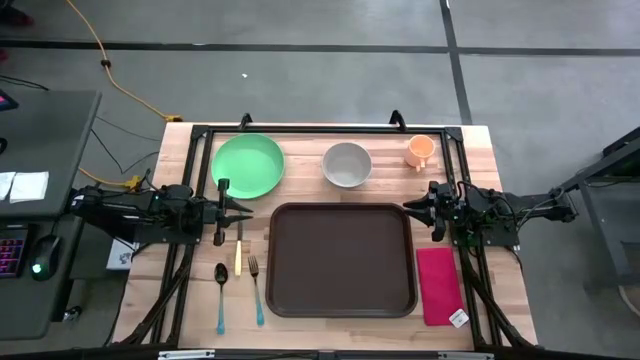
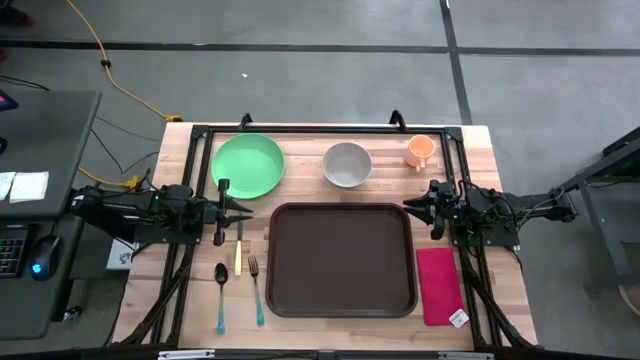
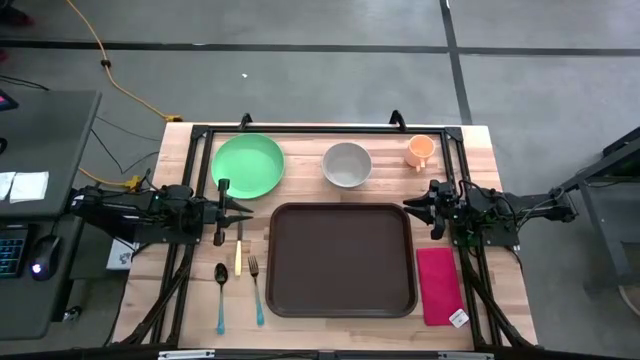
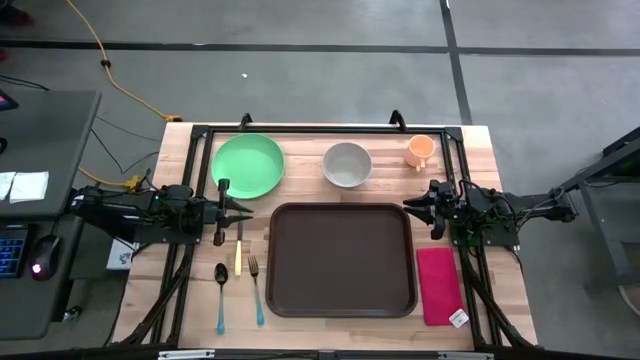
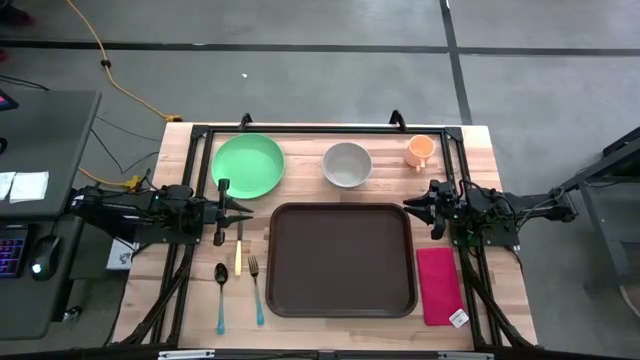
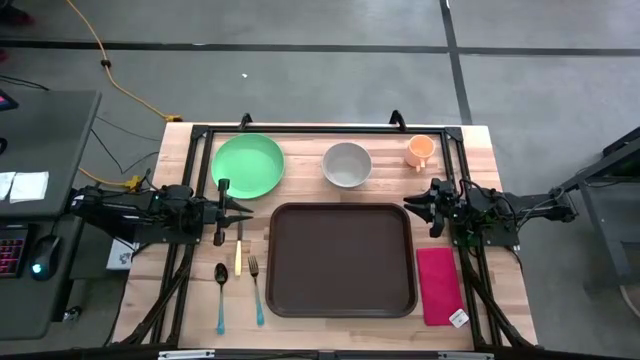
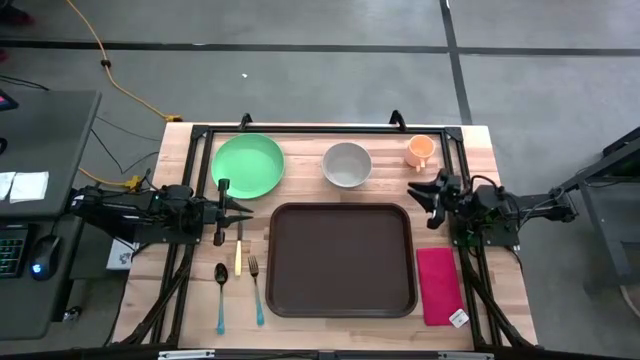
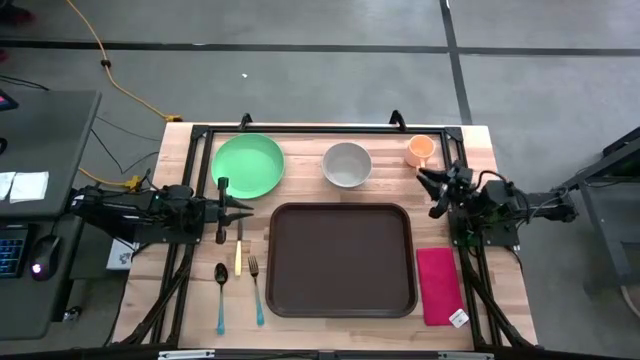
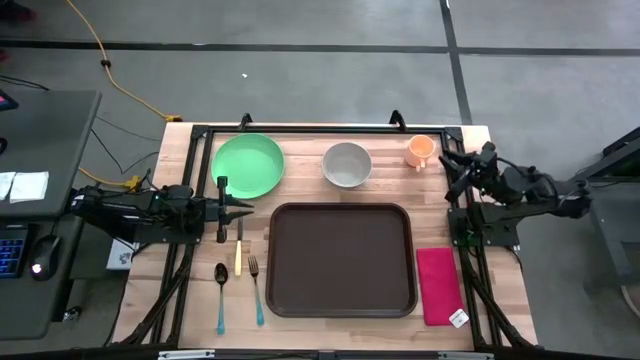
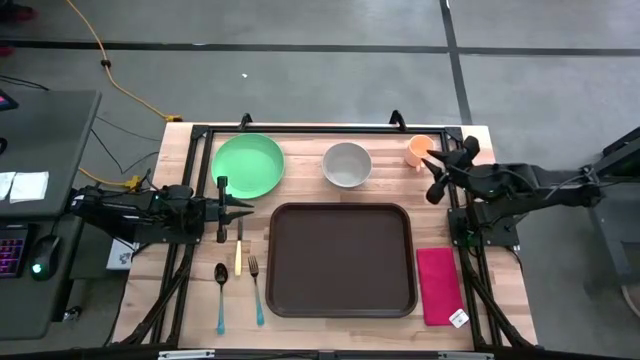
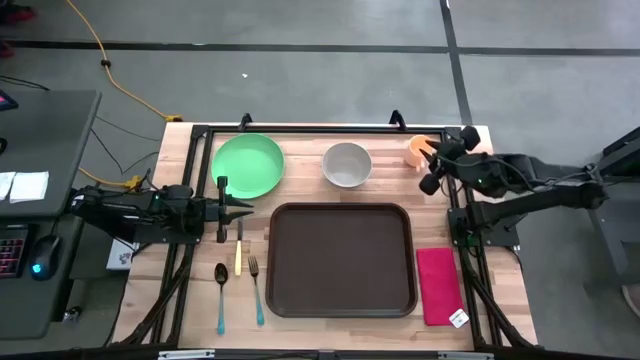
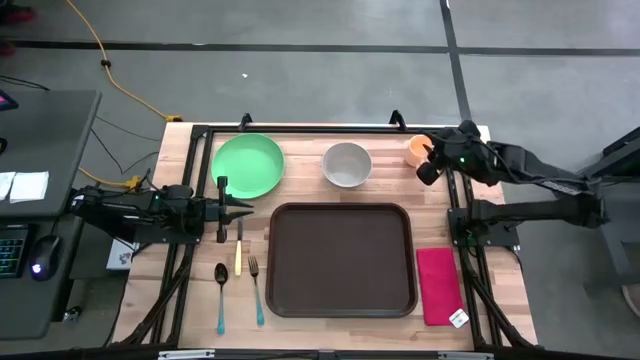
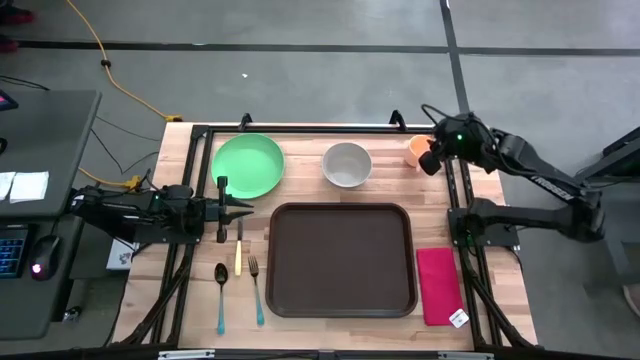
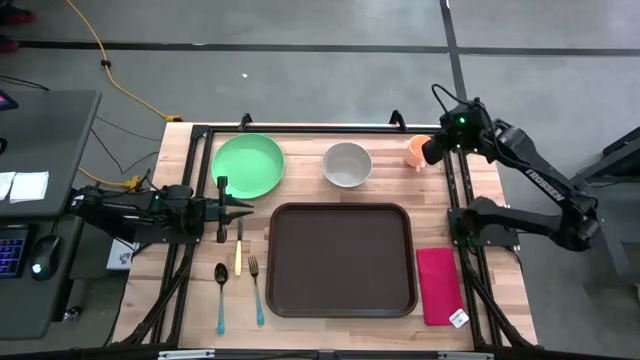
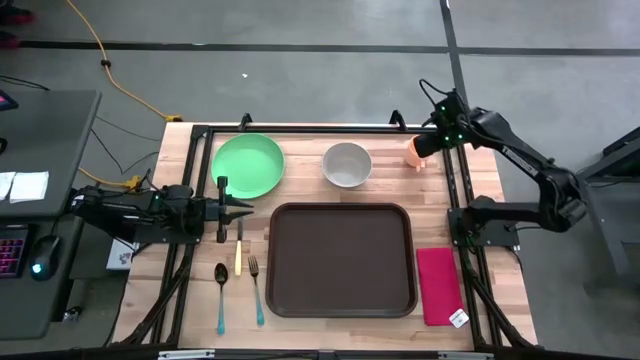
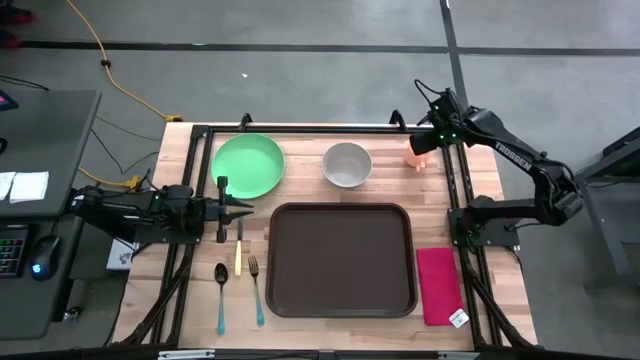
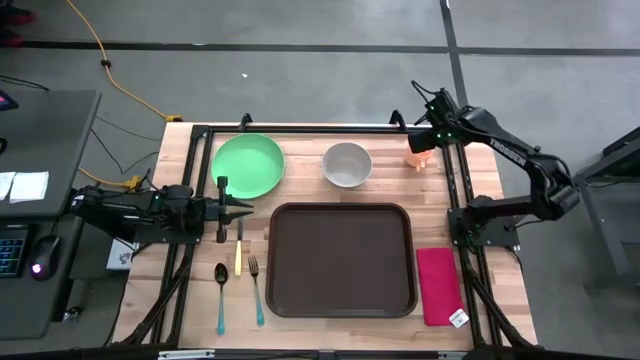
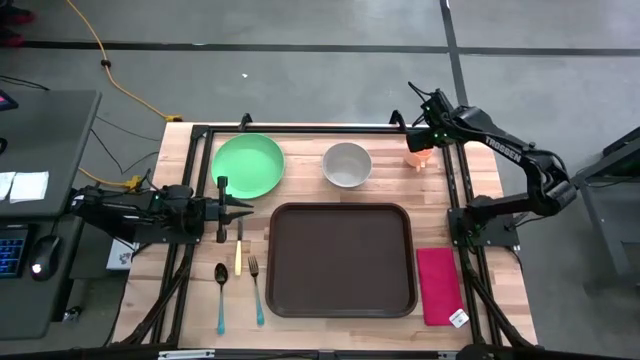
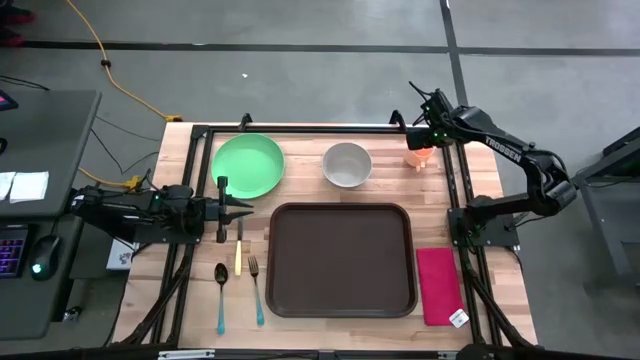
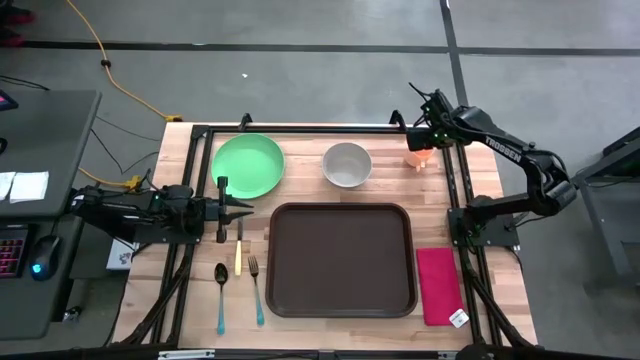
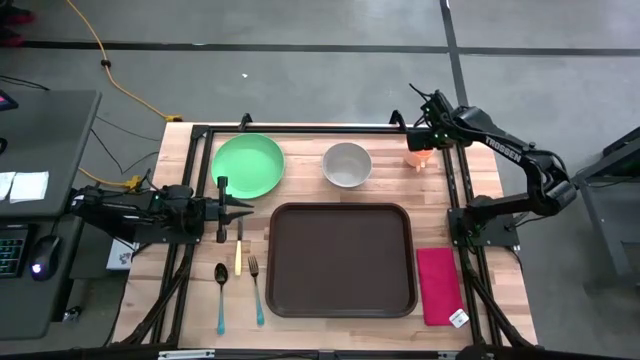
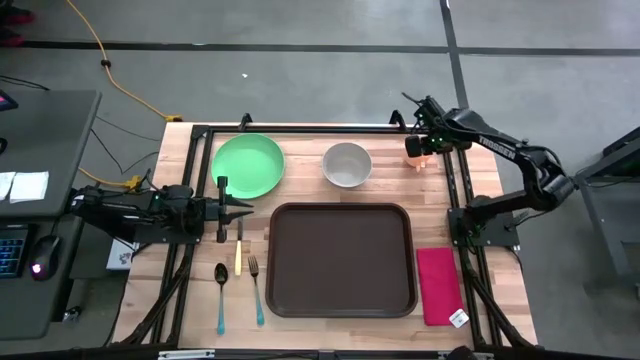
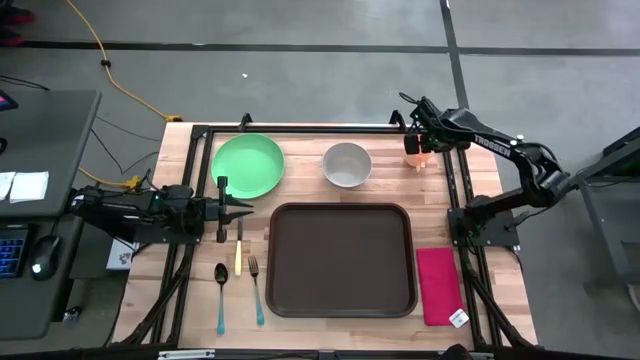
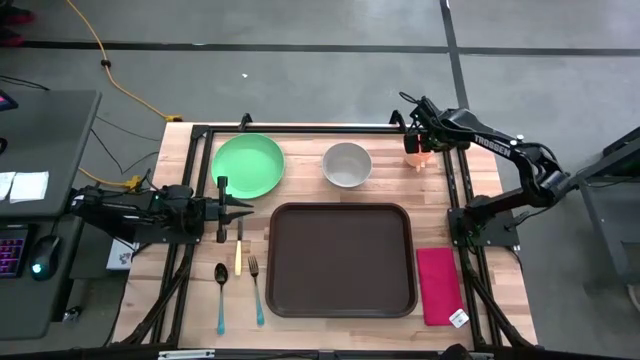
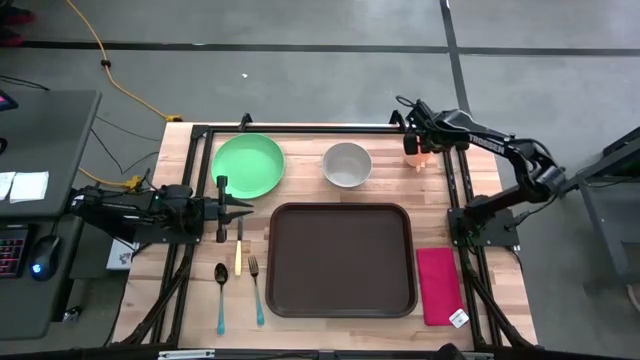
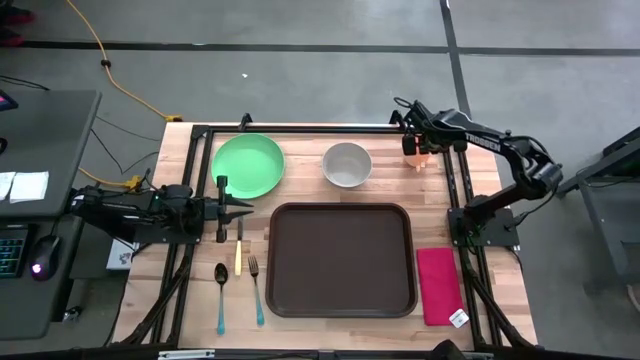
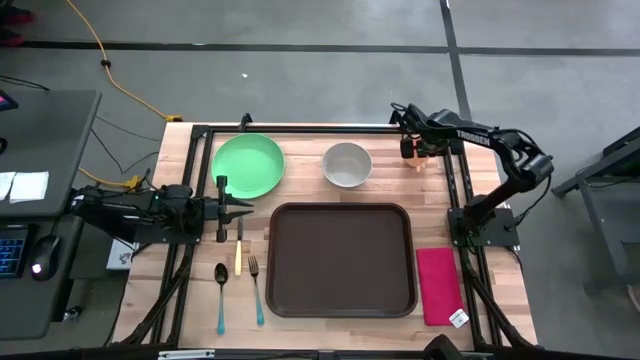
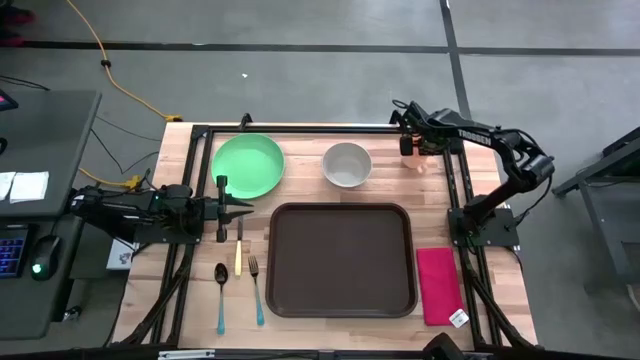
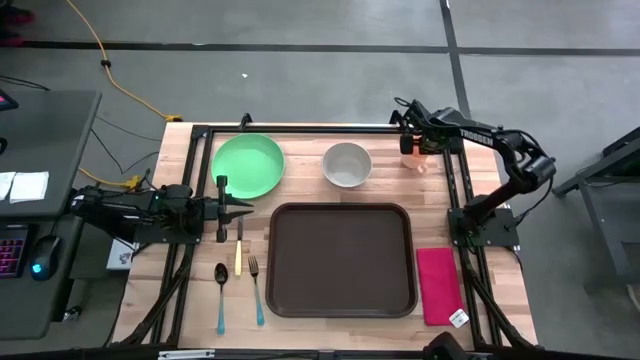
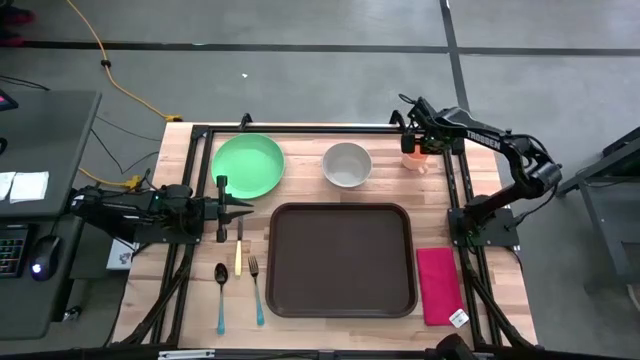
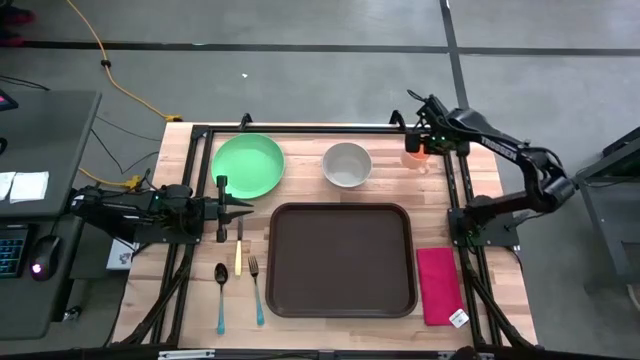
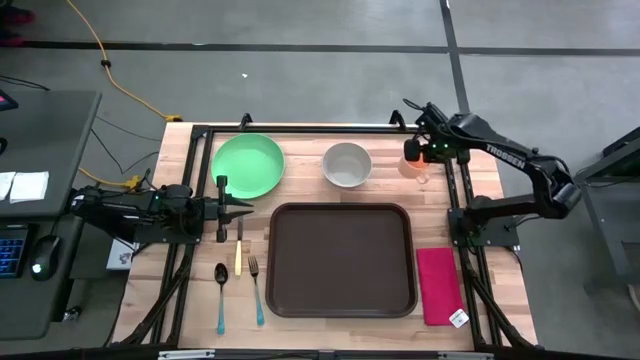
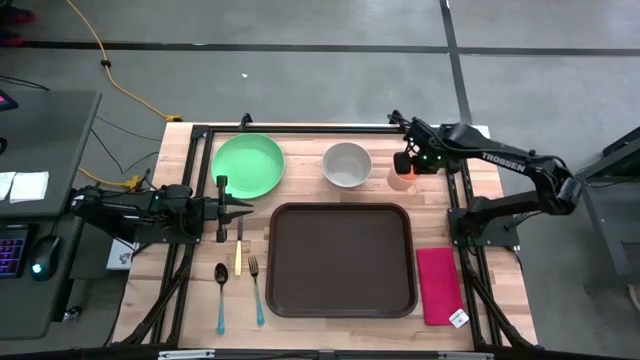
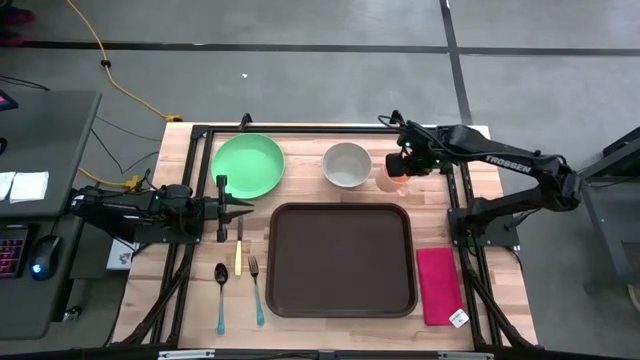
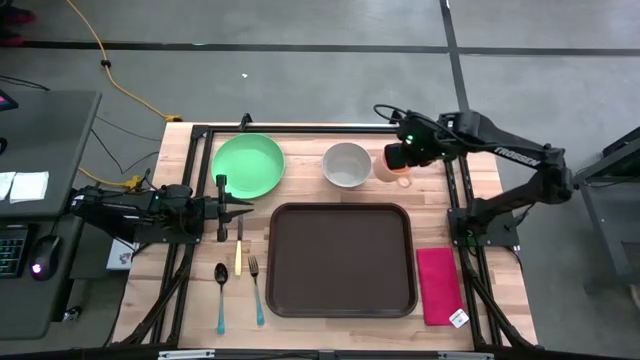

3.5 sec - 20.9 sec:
Task: Set up tray
Put the yellow mug on the brown tray
